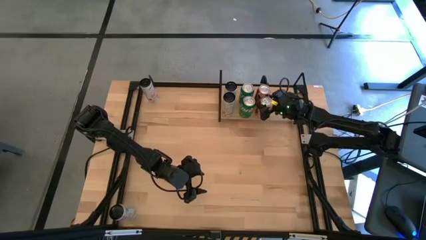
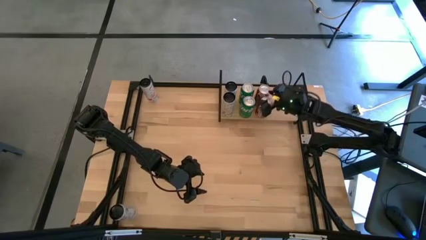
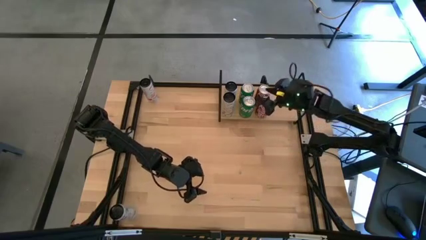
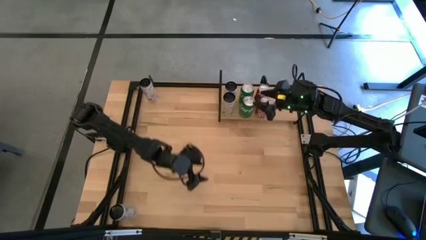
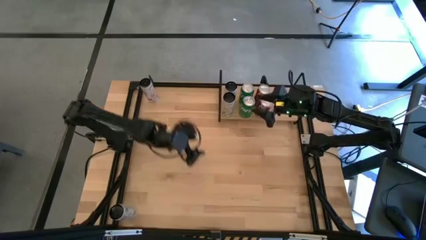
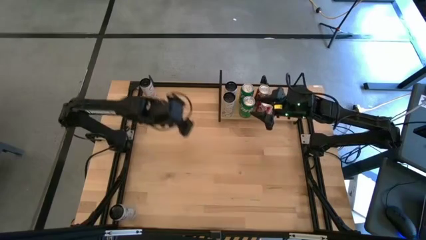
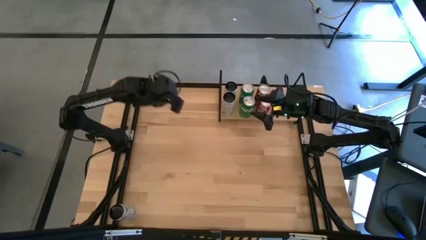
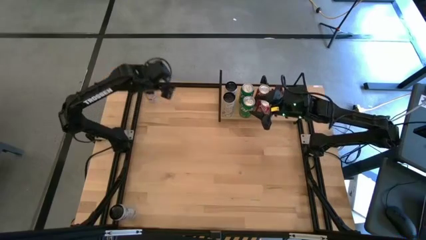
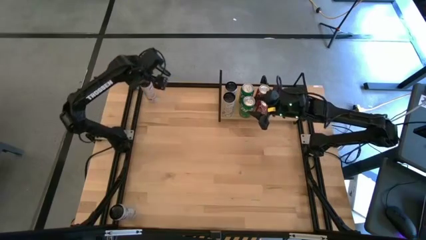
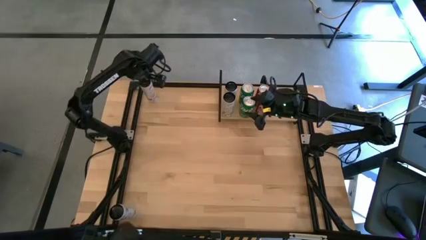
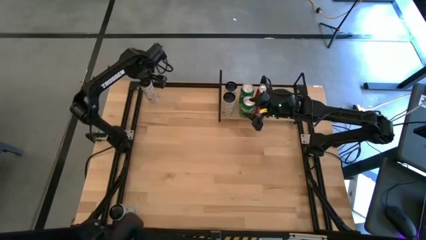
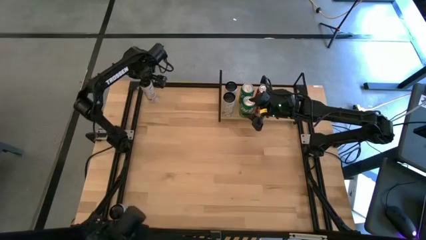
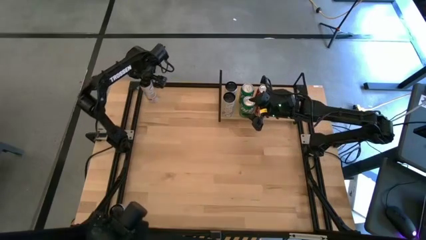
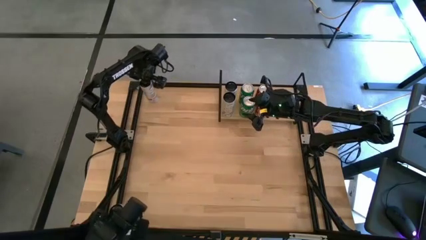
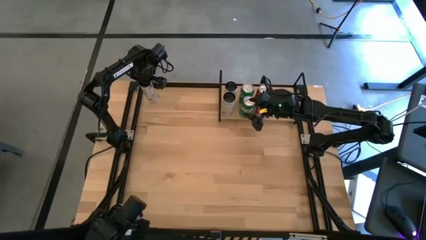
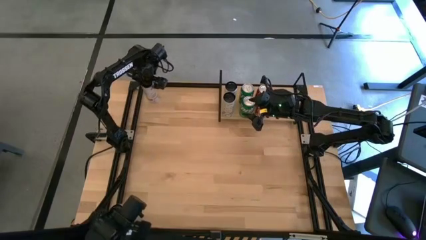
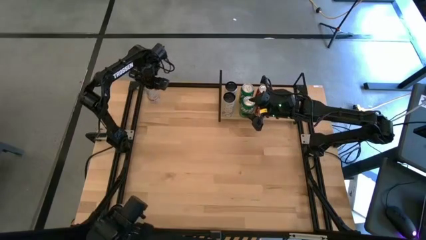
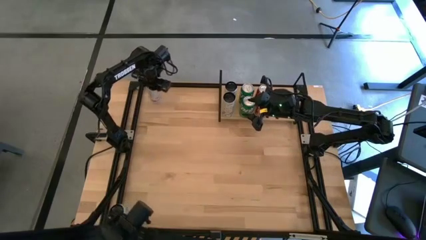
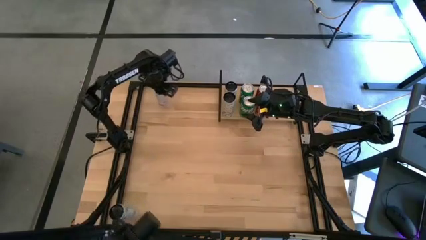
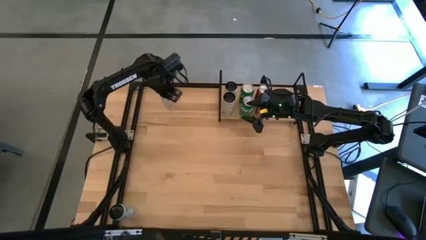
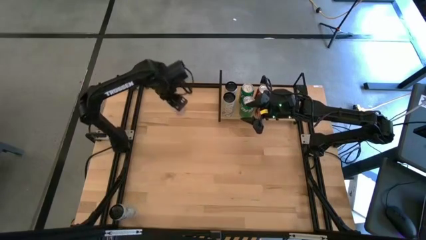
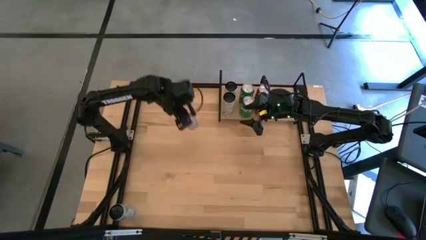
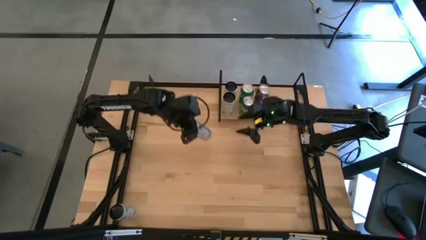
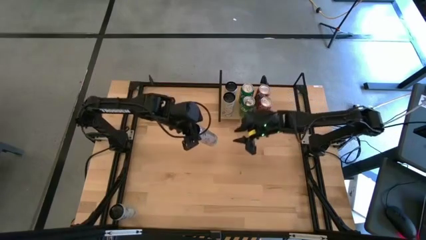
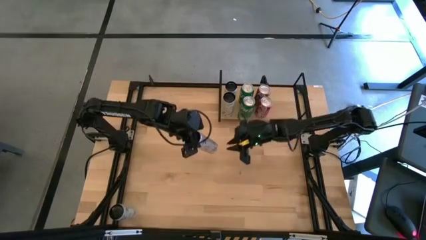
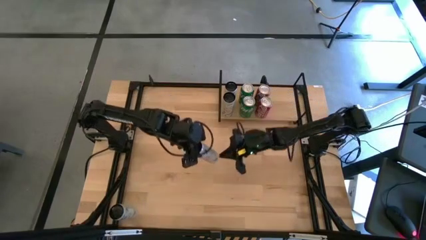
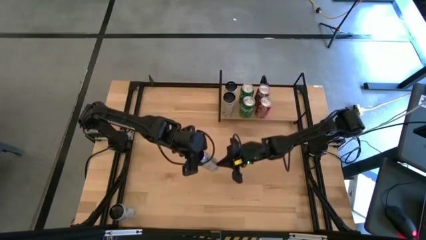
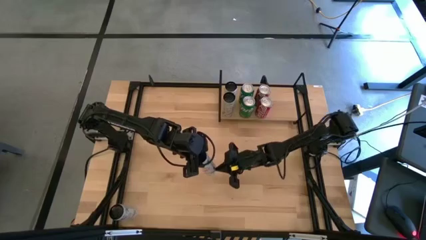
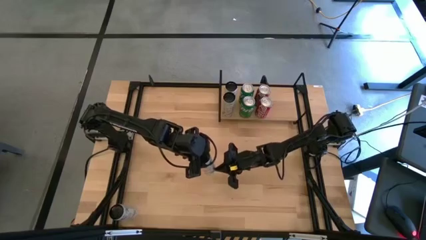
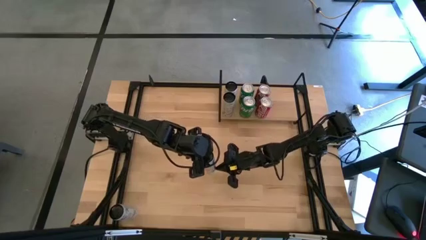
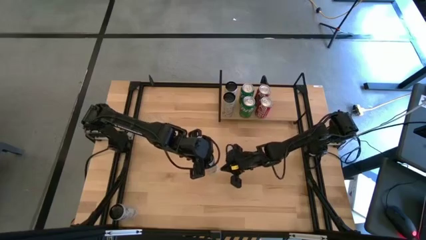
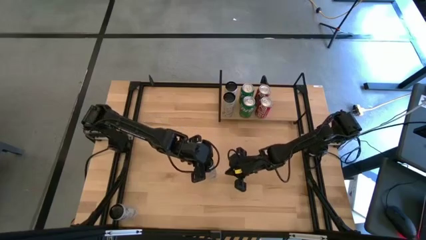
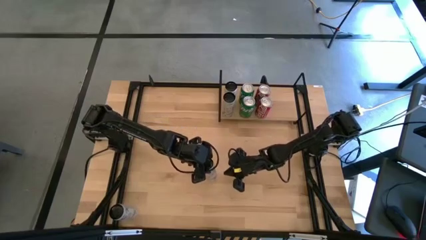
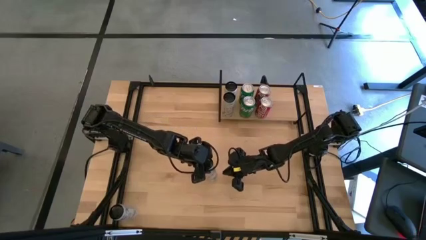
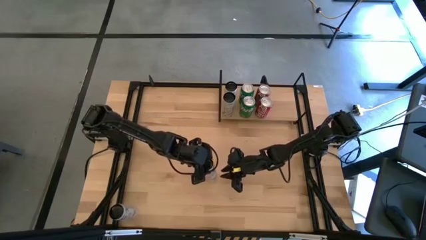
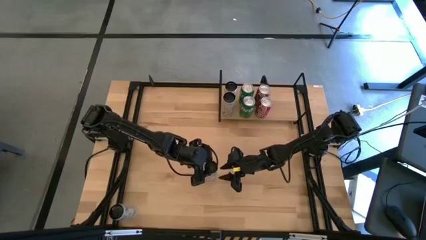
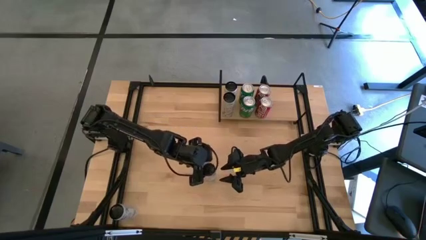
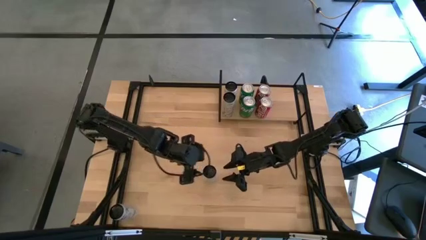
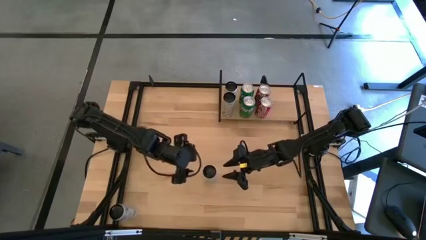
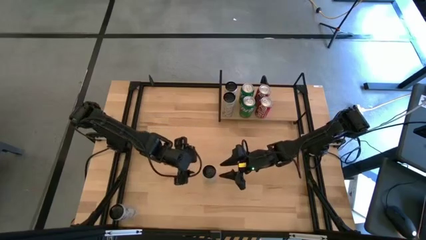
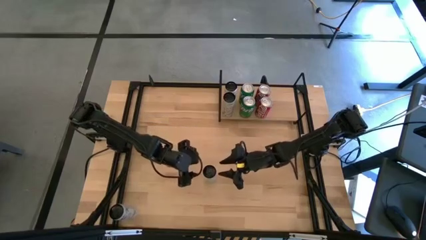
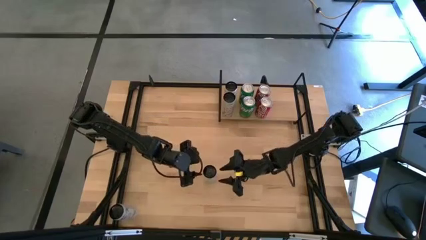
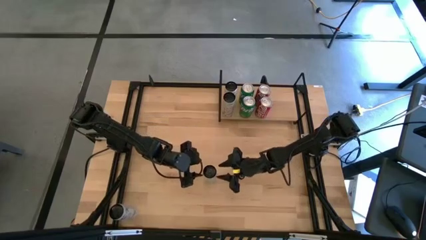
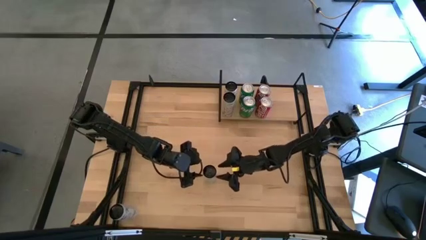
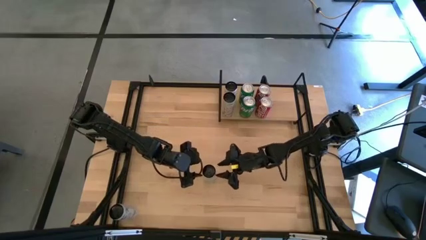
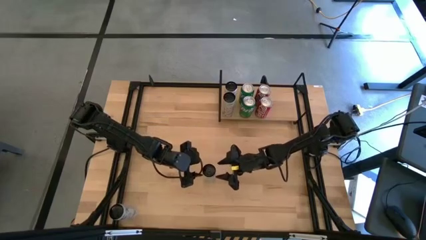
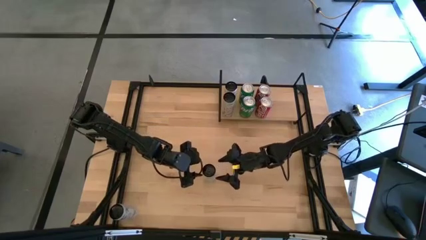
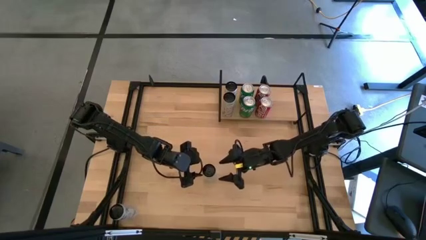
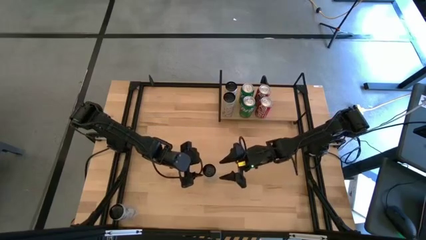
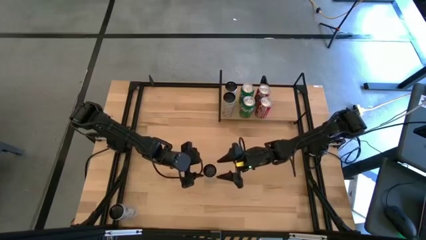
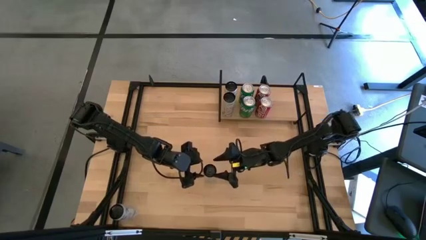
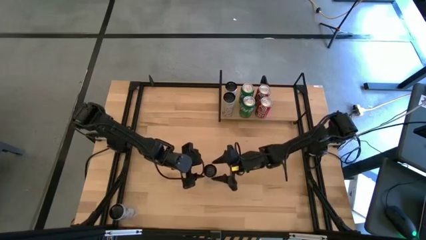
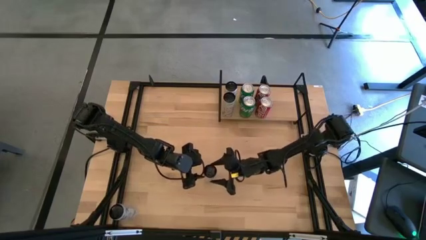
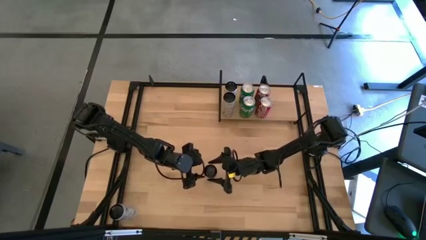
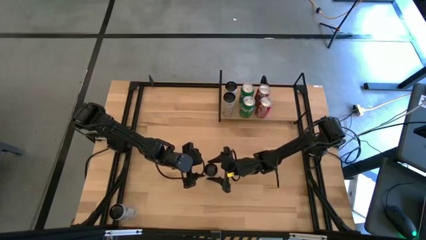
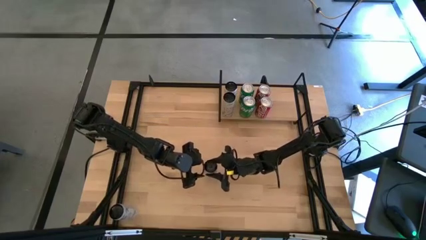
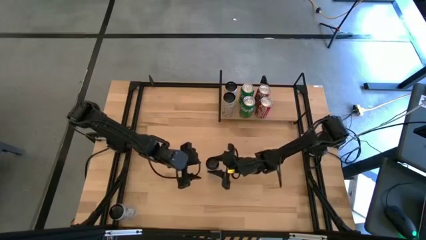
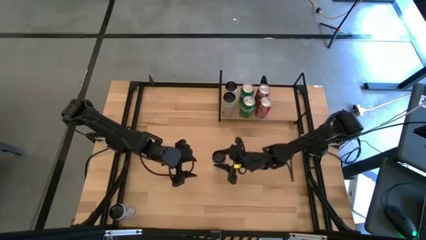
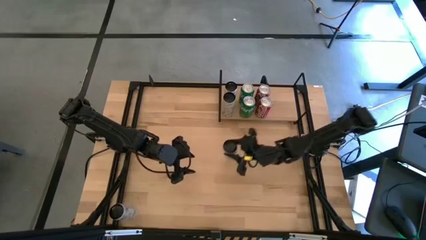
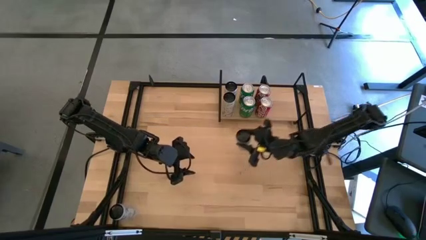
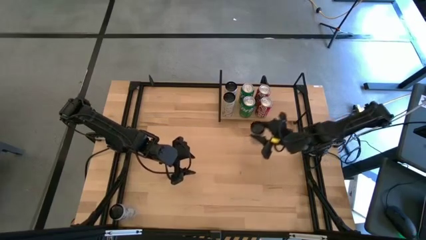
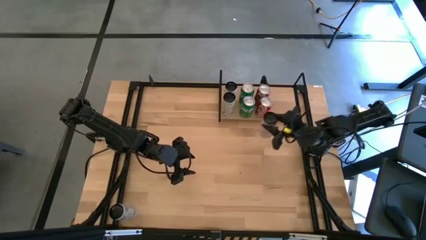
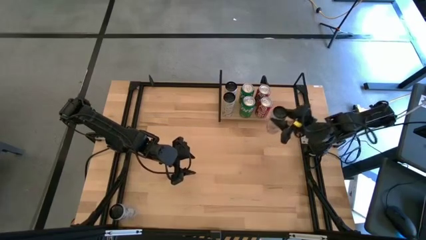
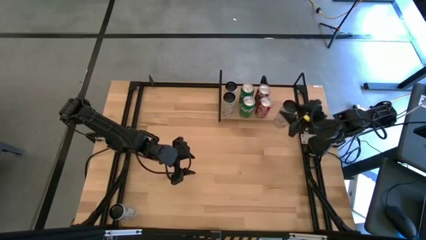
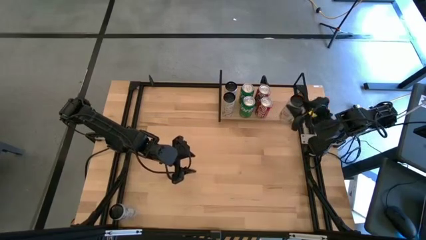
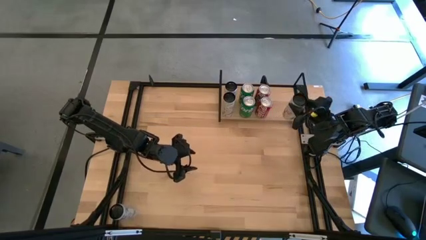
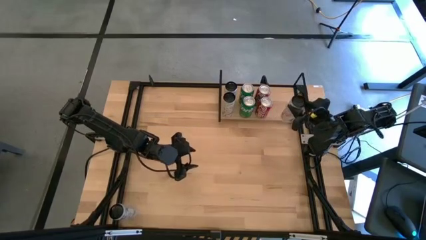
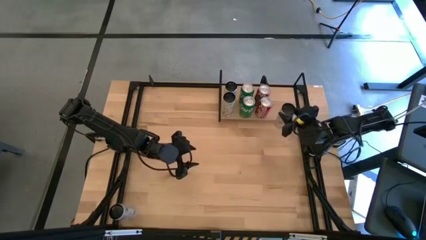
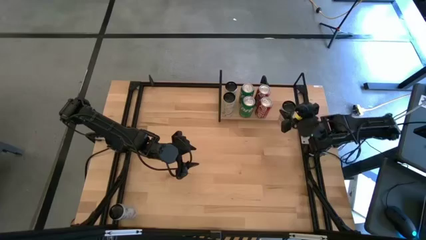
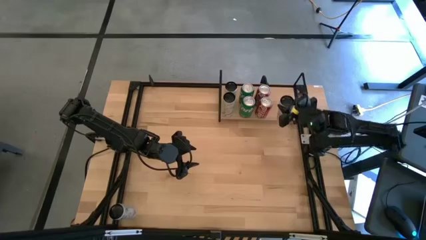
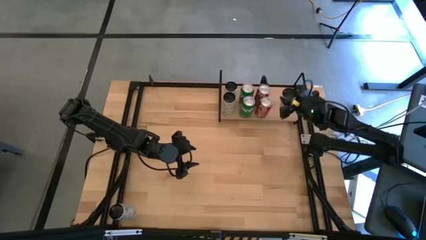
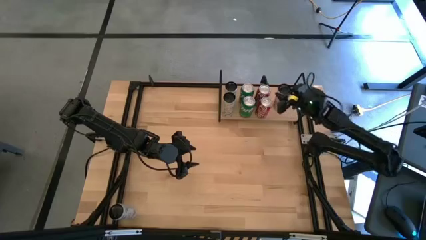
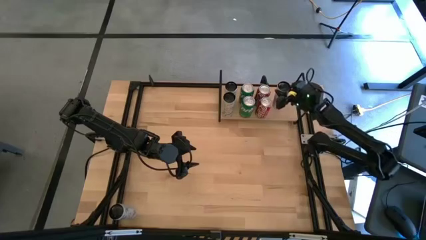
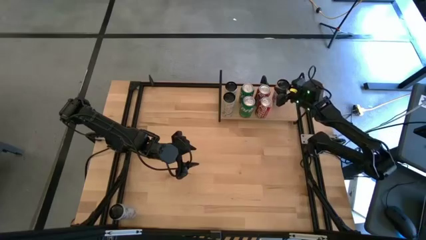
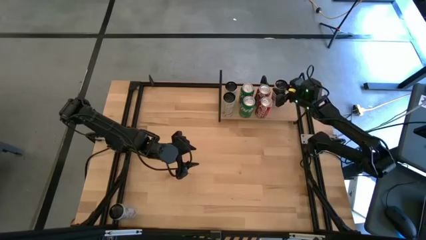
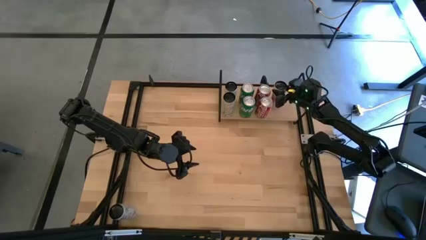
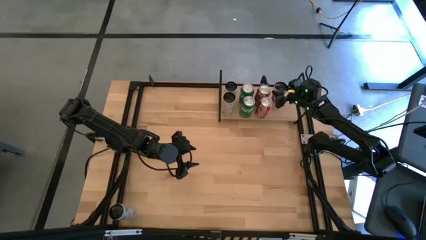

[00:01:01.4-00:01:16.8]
Task: Place canned beverage on shelf
Put the top white-pink soda can on the shelf

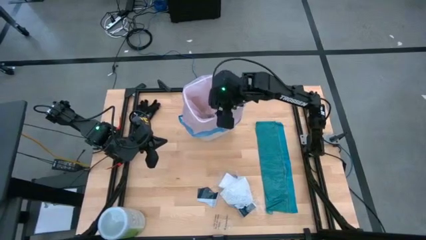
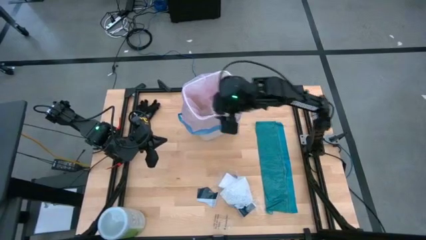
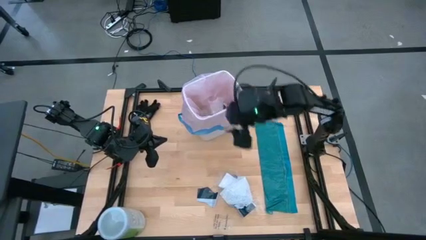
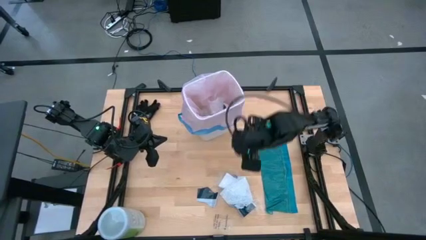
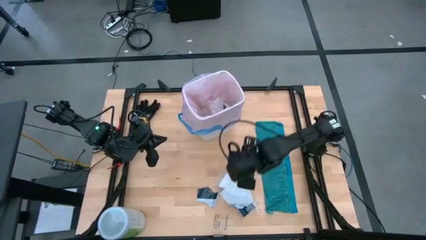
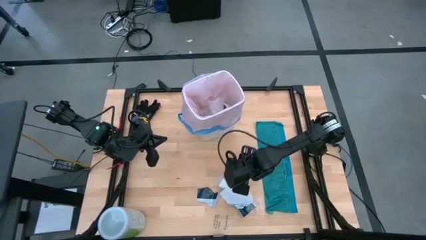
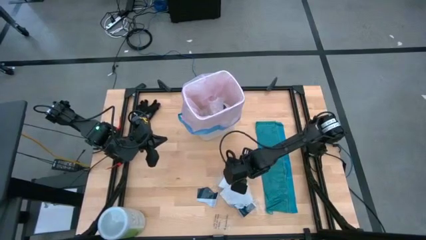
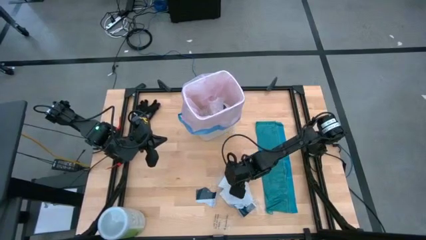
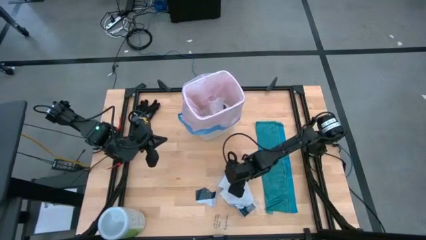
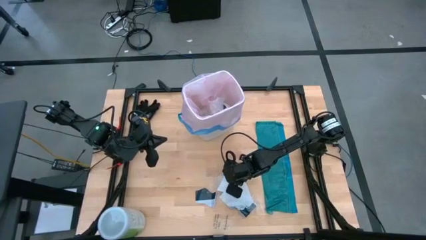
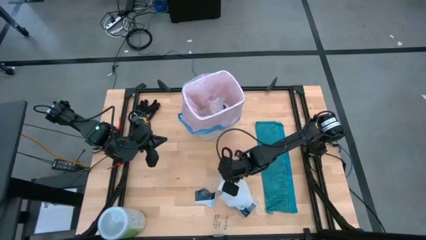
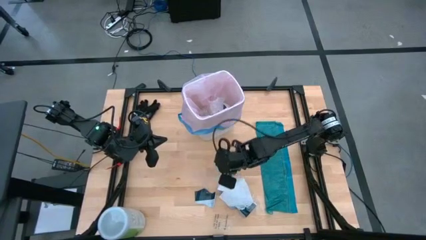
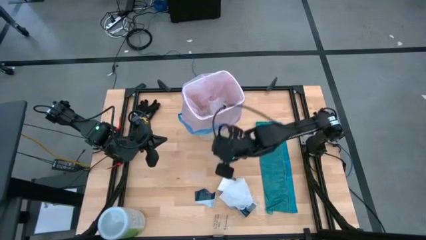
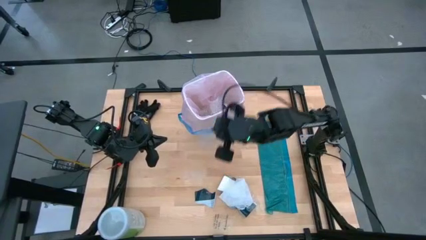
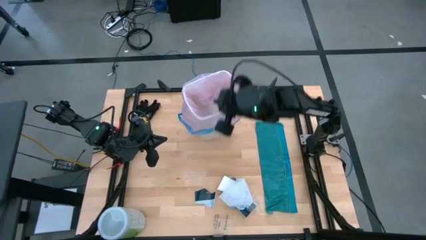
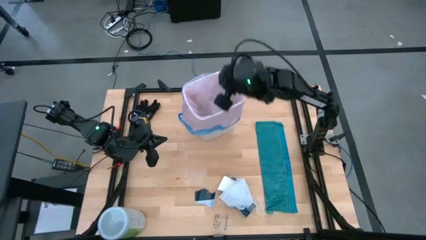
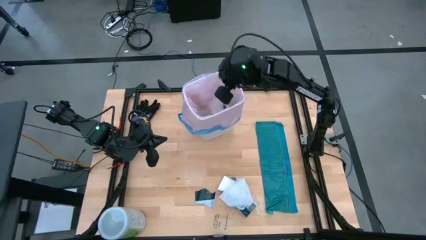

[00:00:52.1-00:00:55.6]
Task: place trash/remove bag and relplace
Put the transparent plastic into the white trash bin
